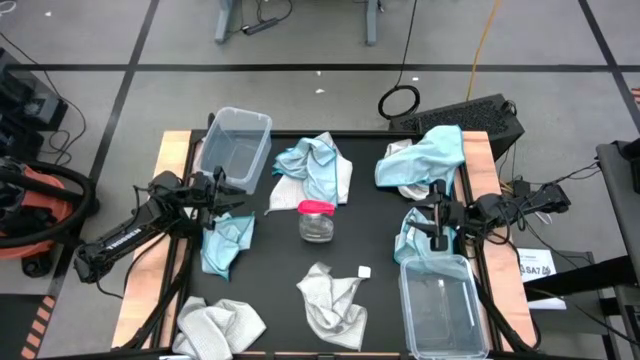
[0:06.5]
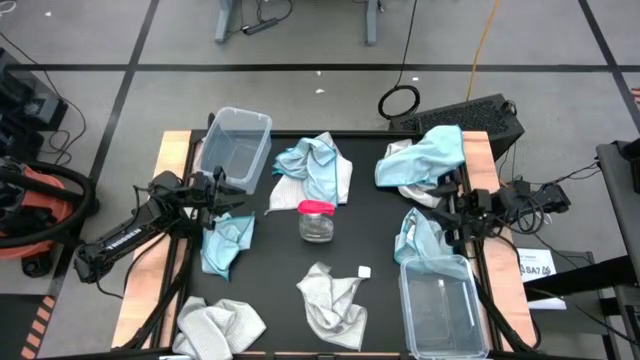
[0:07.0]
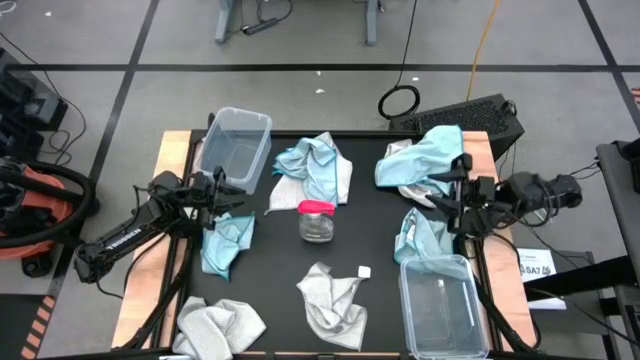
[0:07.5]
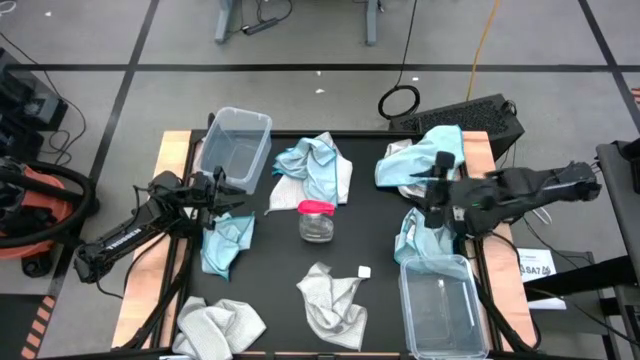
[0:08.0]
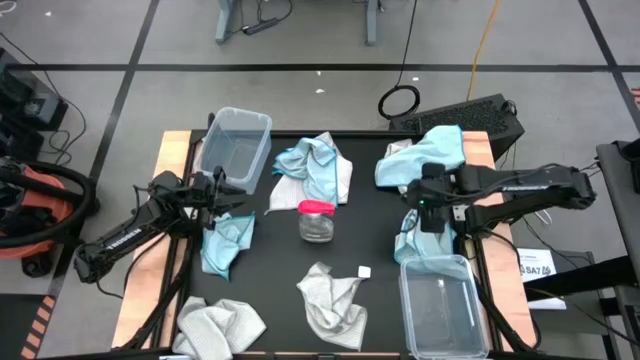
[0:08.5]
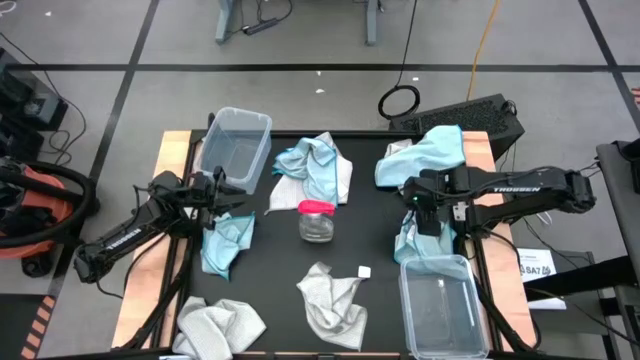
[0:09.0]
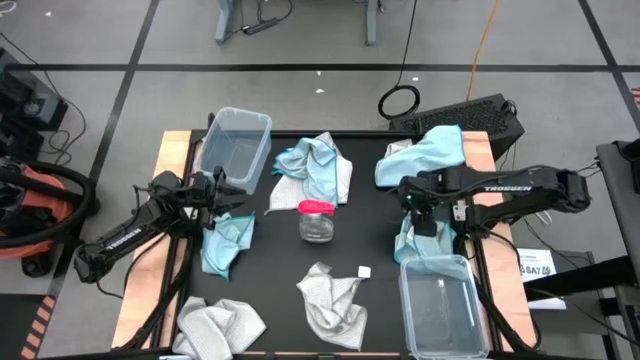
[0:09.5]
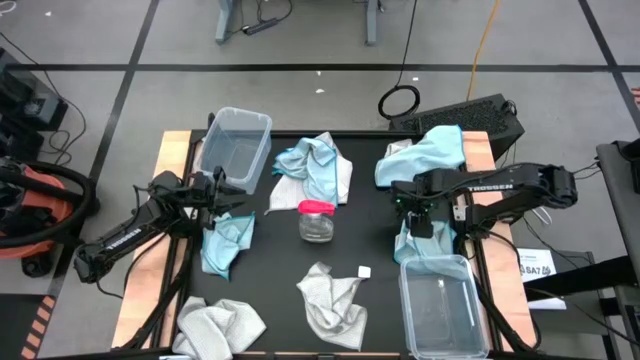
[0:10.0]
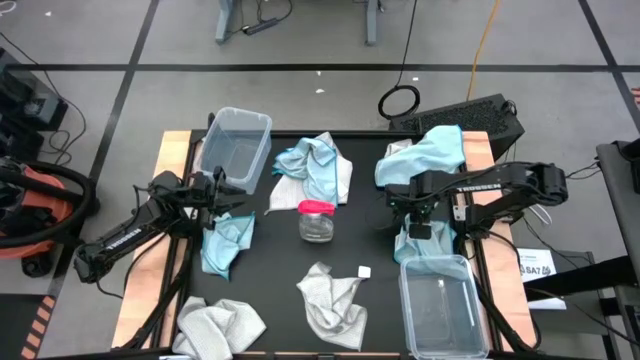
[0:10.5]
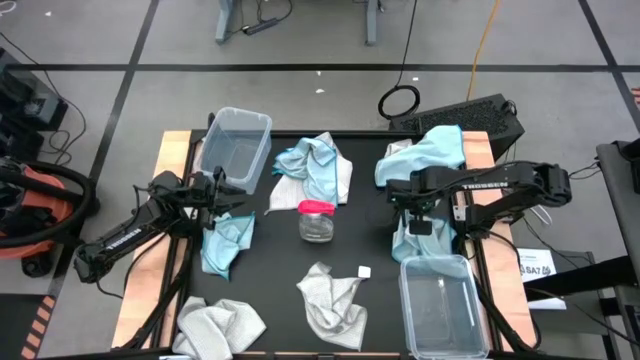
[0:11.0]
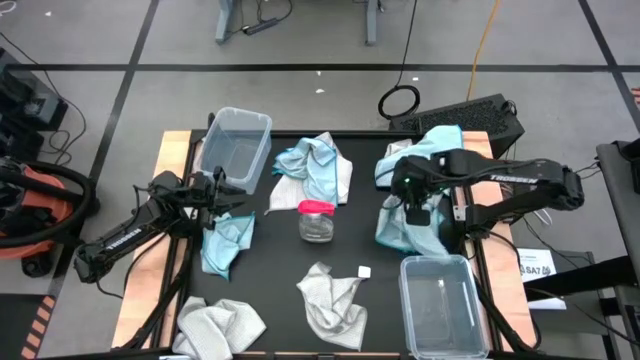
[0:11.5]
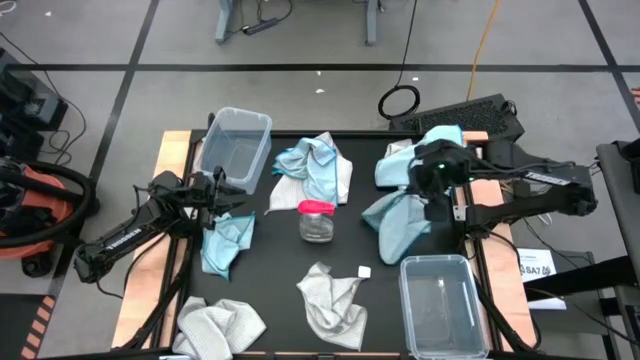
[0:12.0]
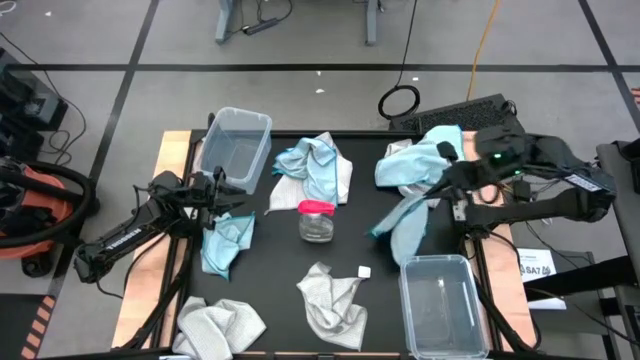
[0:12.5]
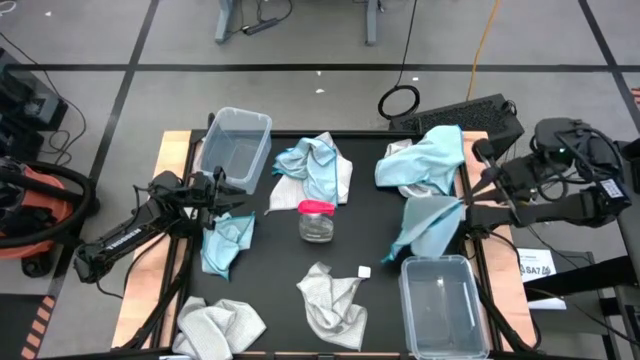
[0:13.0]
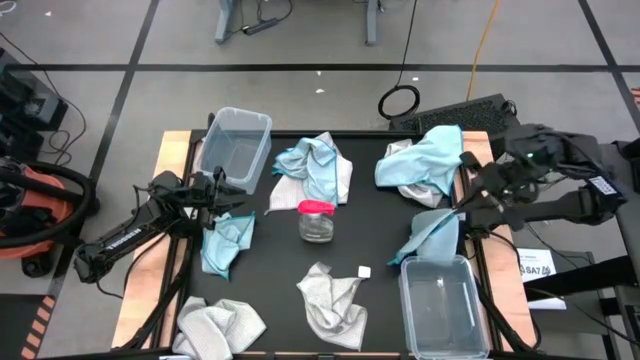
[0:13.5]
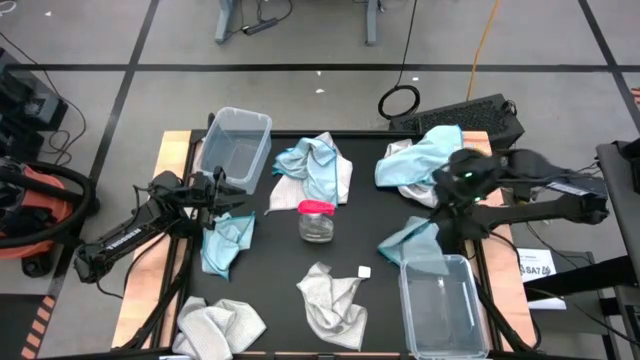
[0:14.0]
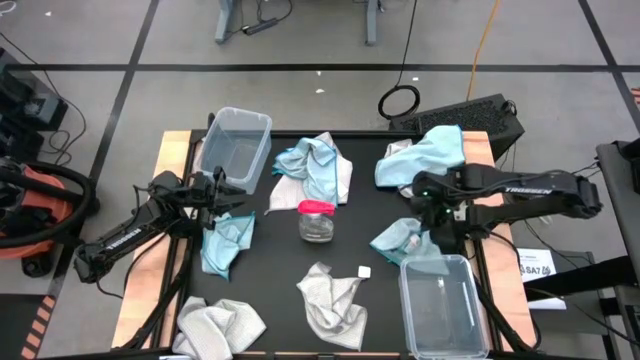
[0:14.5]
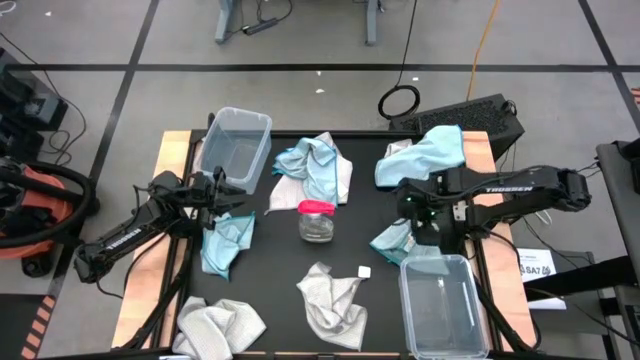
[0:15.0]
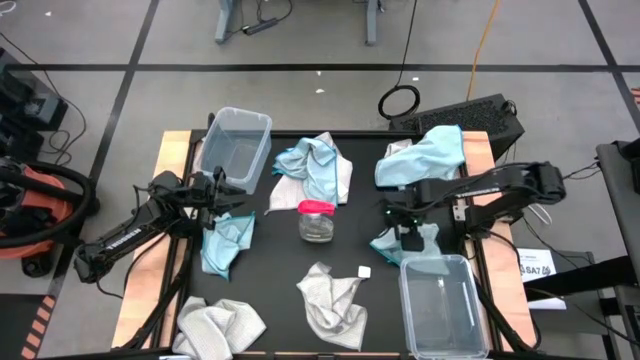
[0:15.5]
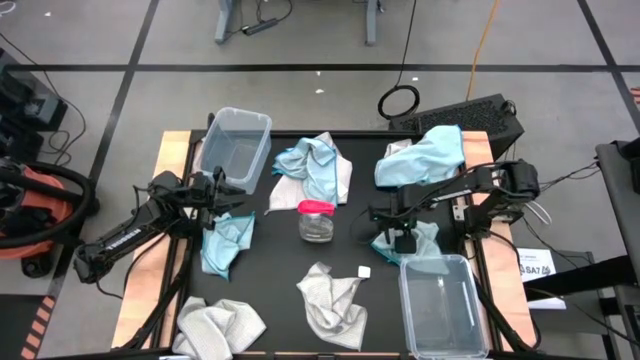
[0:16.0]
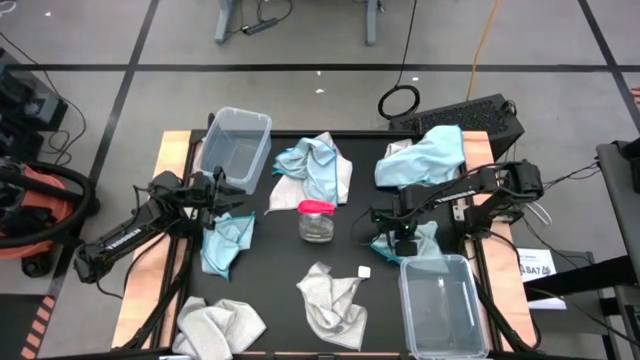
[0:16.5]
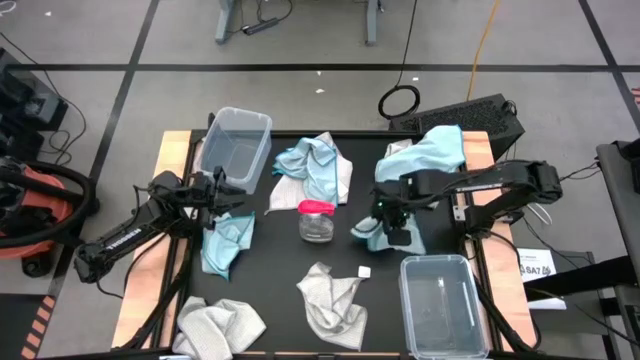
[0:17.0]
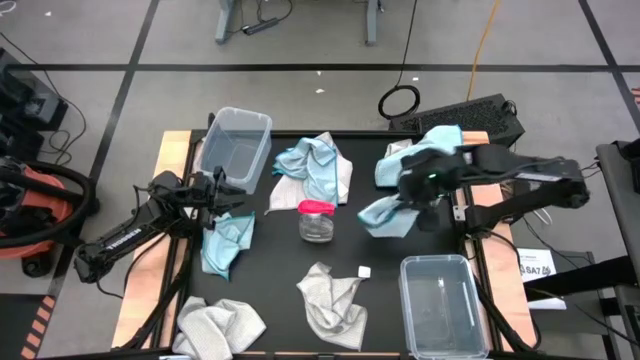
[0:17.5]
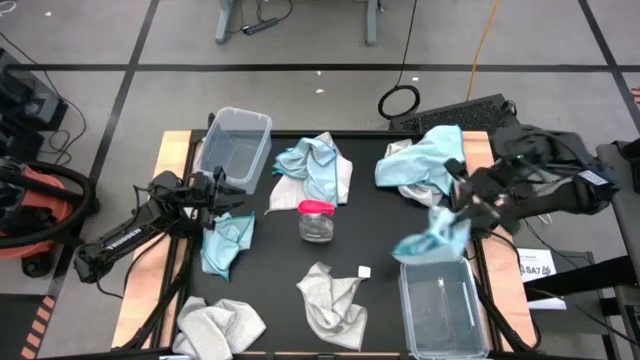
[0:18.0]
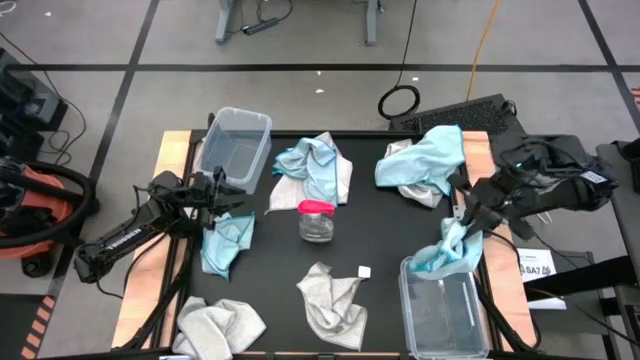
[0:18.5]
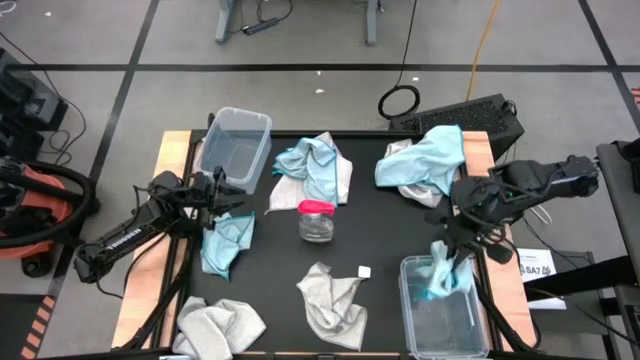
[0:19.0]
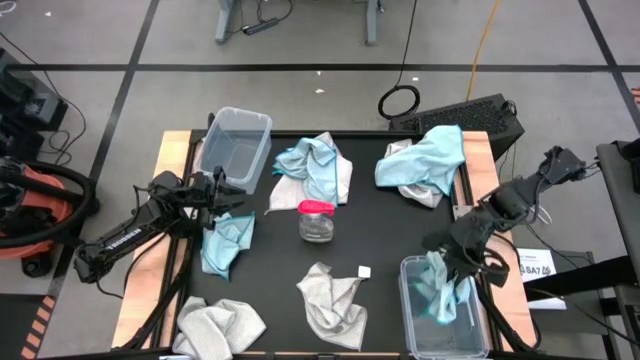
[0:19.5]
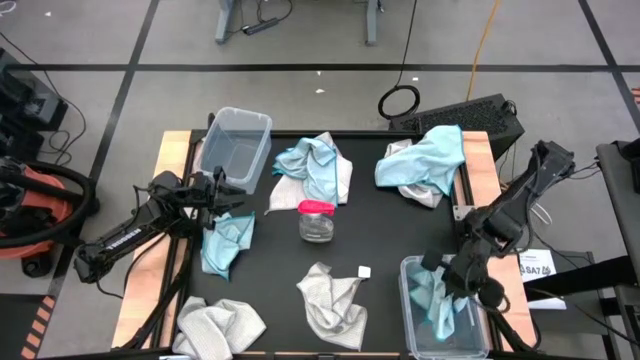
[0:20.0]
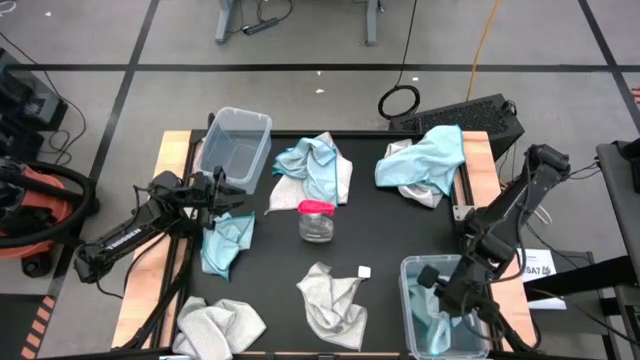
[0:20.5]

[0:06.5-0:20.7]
Task: Sort microfiber towel by color & place in baskets
Put the bottom right light blue towel into the right transparent bin

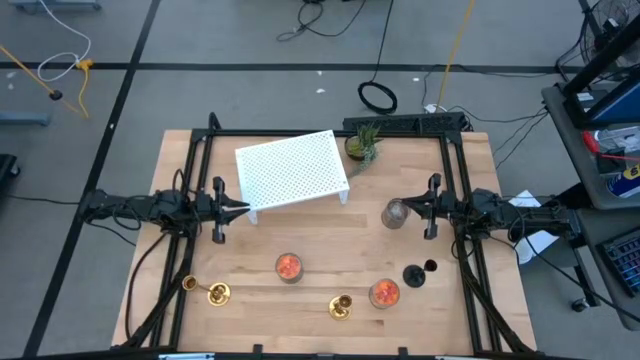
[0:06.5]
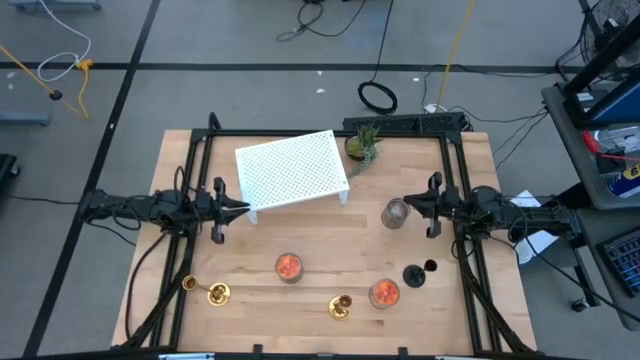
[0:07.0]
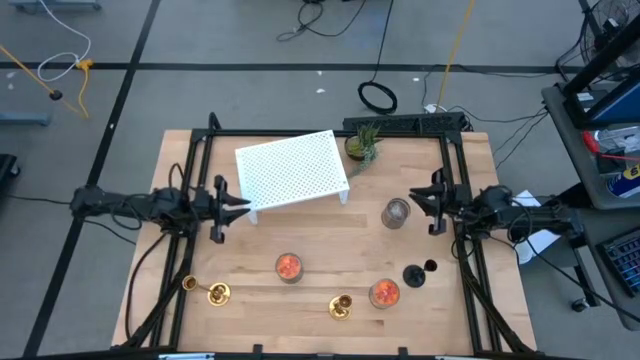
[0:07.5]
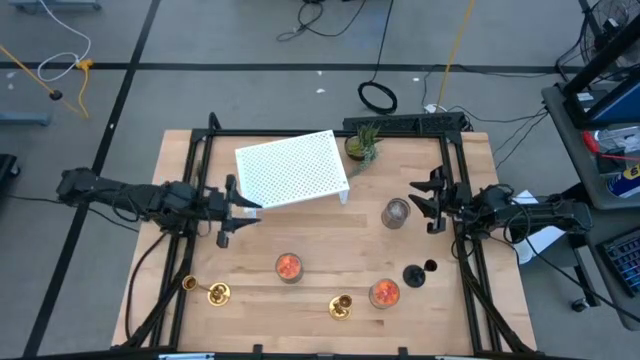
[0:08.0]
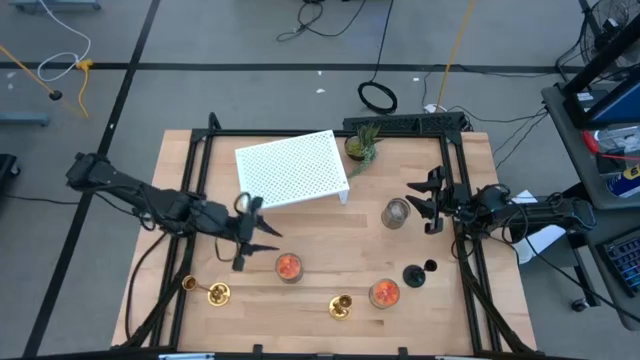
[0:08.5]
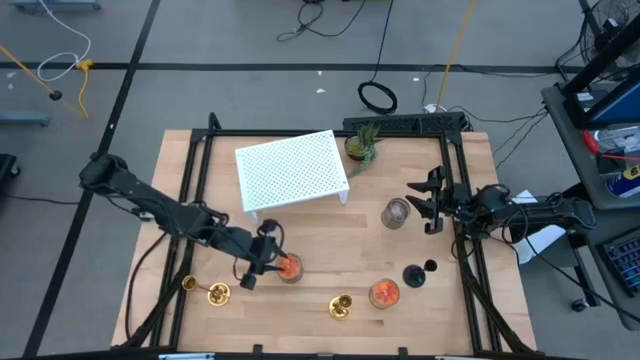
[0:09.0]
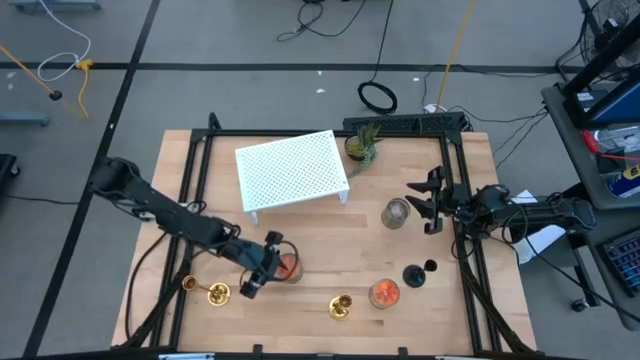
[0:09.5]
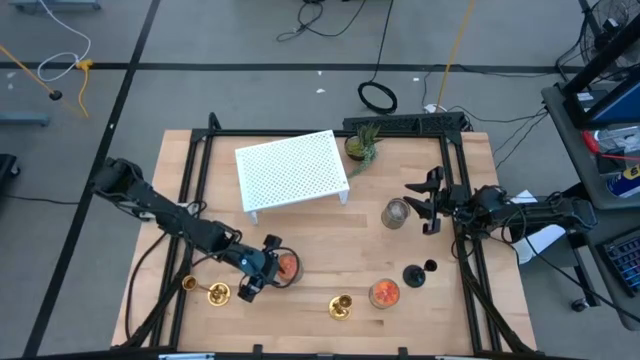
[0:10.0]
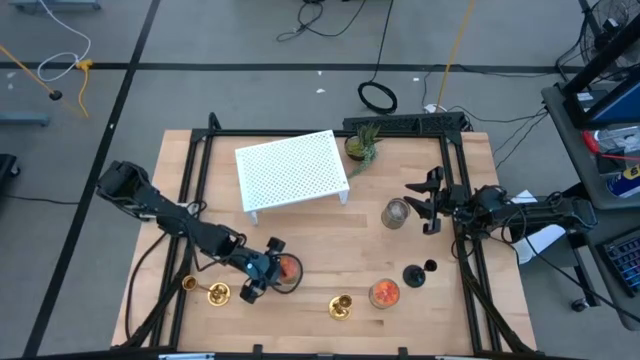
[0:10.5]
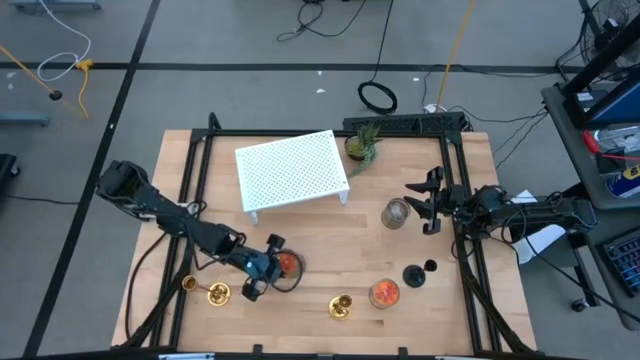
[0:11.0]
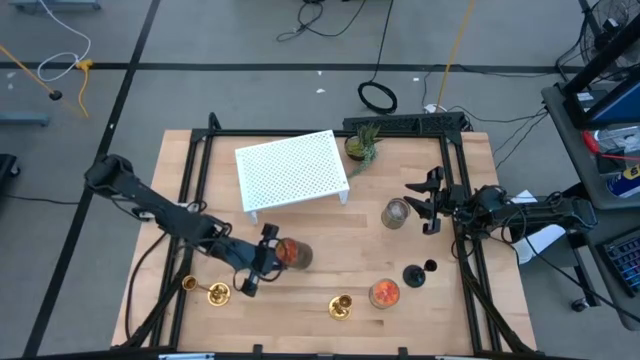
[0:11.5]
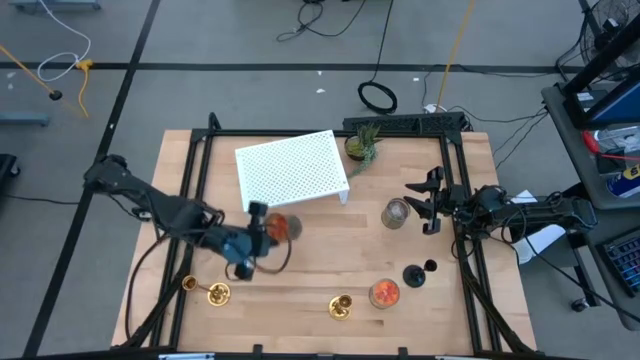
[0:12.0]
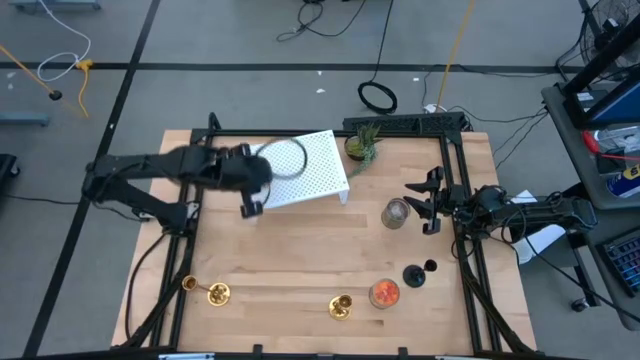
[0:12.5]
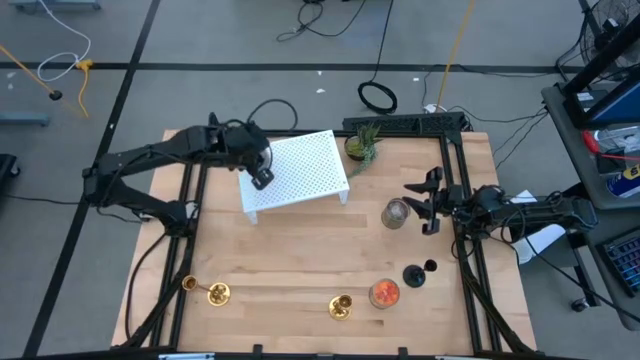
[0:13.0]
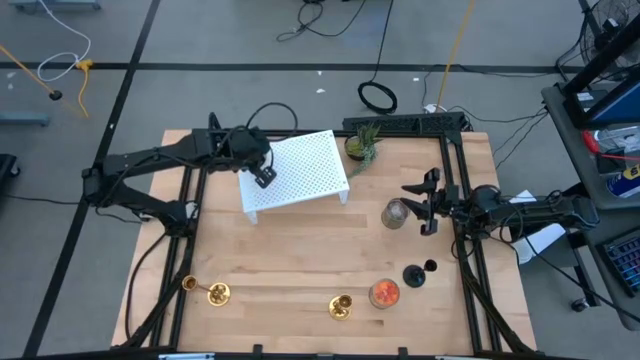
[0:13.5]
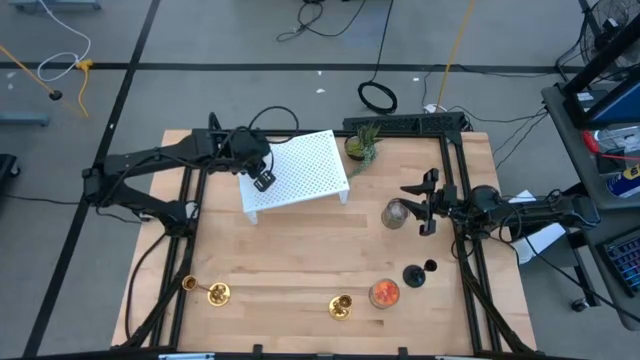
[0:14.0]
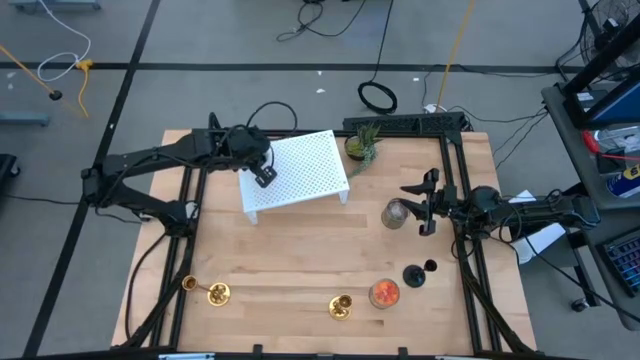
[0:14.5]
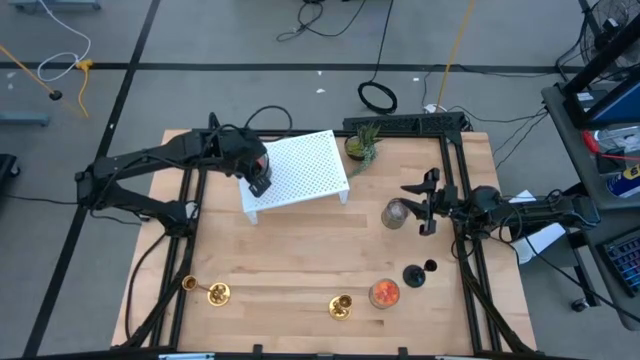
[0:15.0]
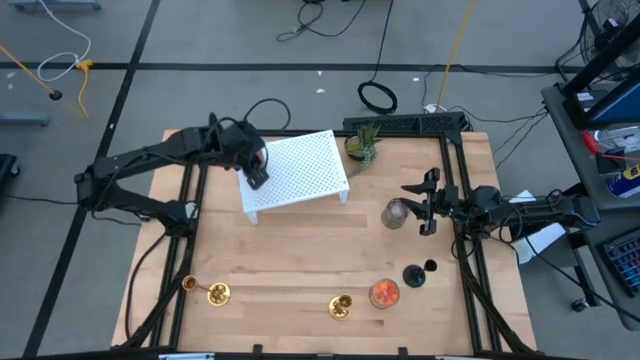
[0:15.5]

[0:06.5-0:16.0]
Task: Pick & Place candle stick holders
Put the top orange scented candle on the shelf
